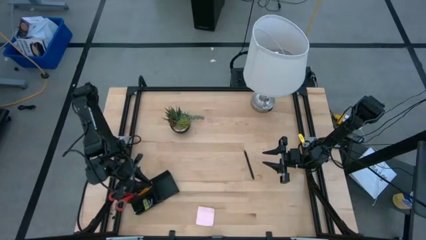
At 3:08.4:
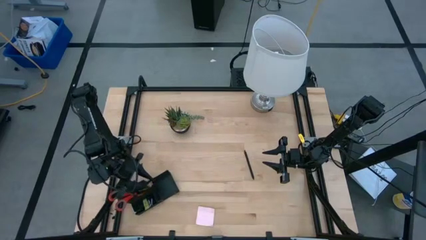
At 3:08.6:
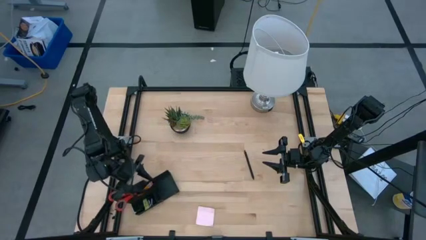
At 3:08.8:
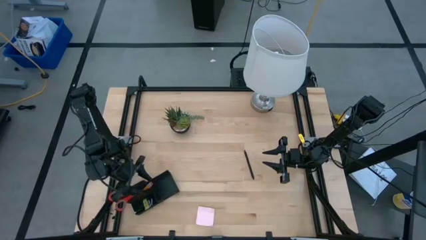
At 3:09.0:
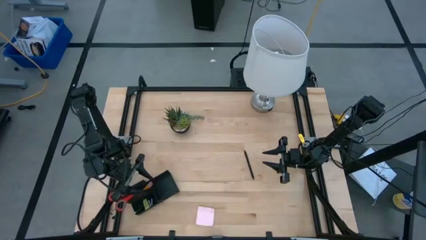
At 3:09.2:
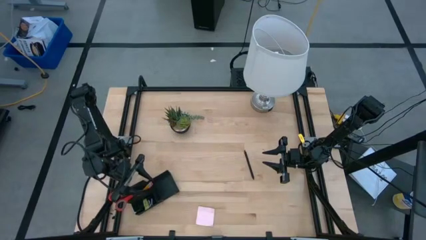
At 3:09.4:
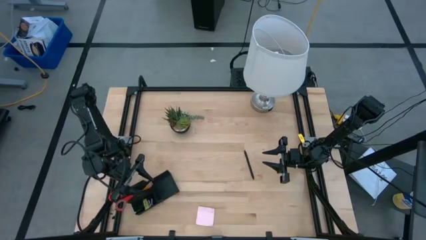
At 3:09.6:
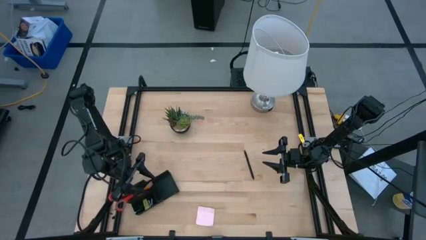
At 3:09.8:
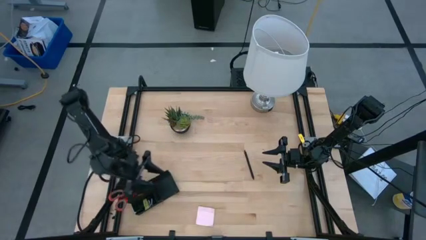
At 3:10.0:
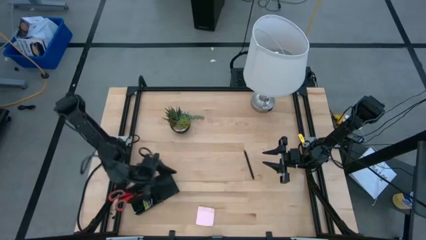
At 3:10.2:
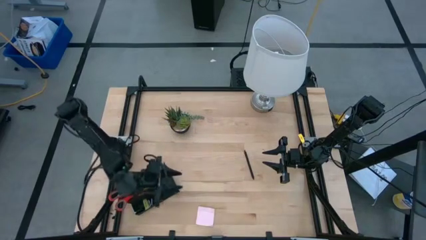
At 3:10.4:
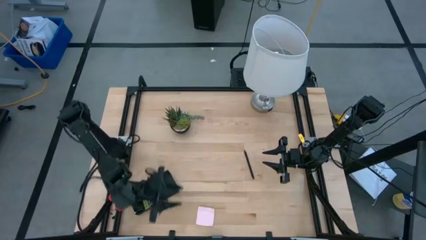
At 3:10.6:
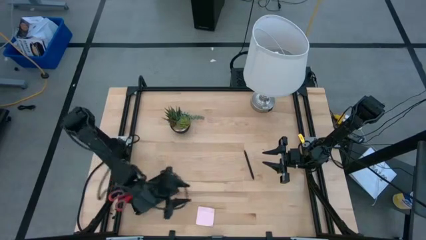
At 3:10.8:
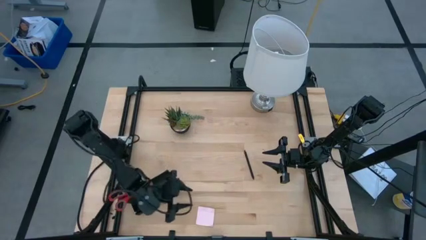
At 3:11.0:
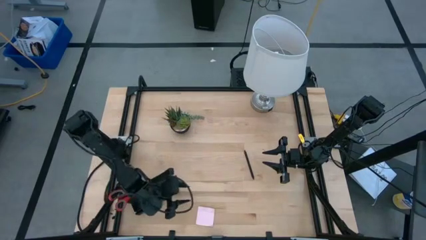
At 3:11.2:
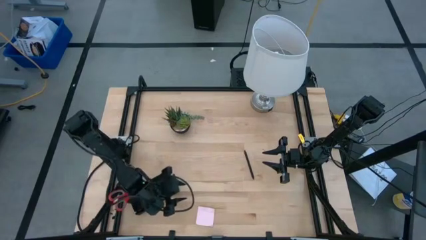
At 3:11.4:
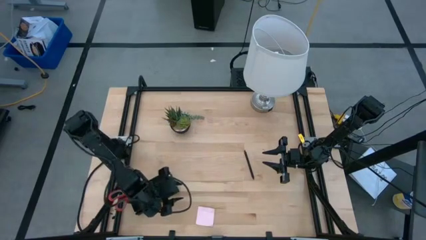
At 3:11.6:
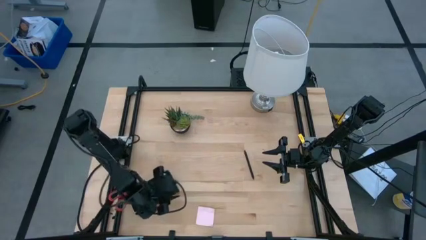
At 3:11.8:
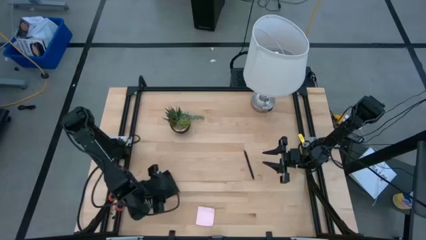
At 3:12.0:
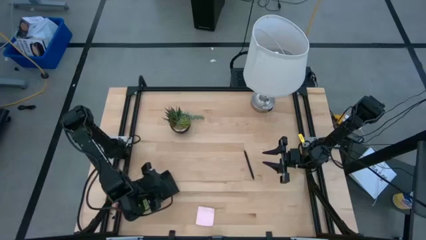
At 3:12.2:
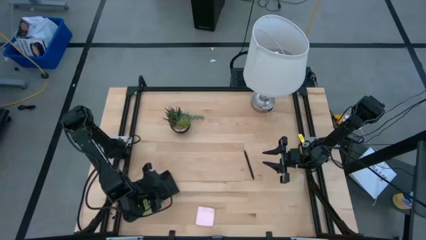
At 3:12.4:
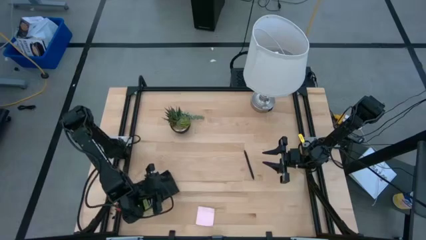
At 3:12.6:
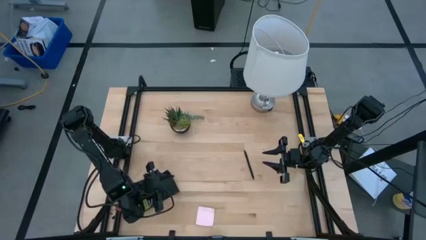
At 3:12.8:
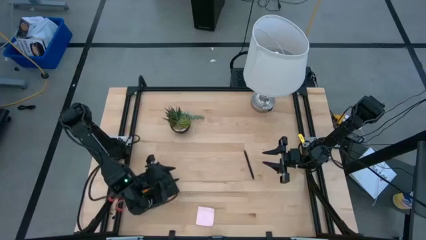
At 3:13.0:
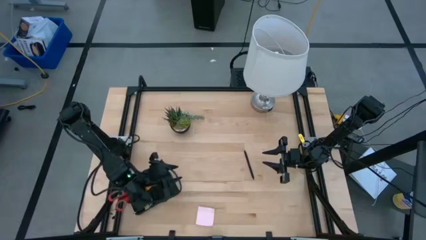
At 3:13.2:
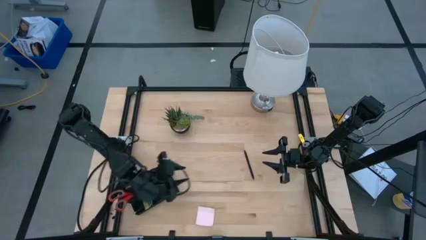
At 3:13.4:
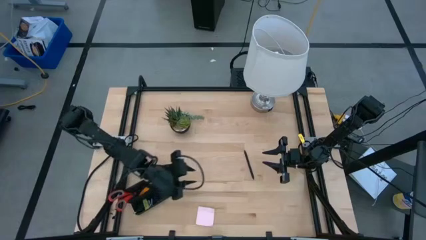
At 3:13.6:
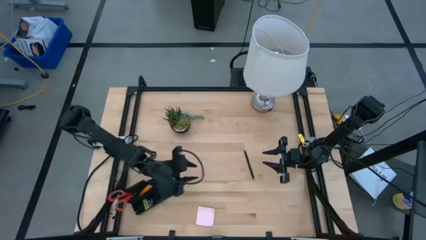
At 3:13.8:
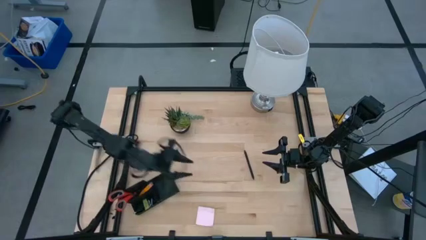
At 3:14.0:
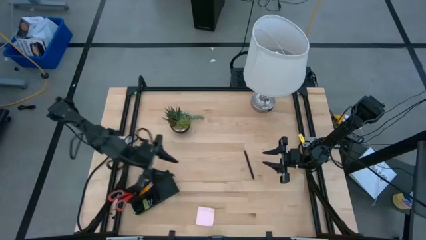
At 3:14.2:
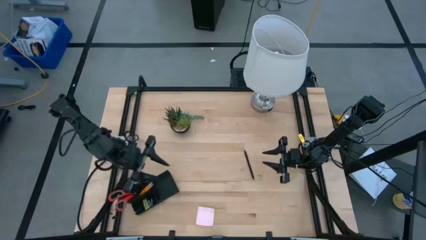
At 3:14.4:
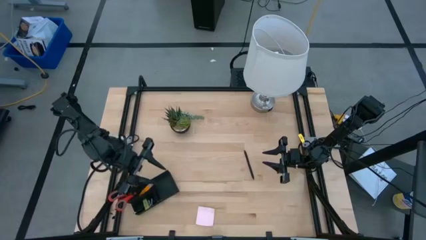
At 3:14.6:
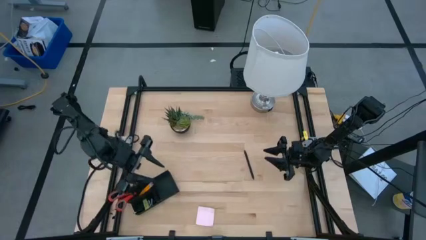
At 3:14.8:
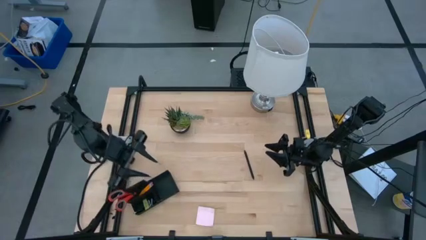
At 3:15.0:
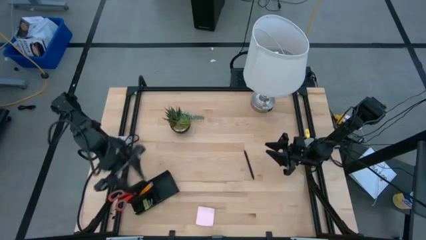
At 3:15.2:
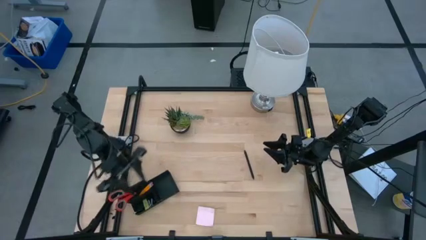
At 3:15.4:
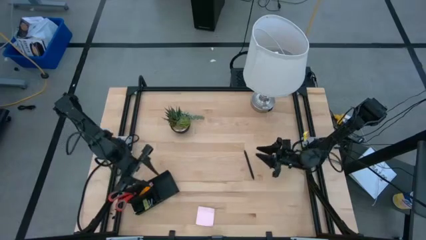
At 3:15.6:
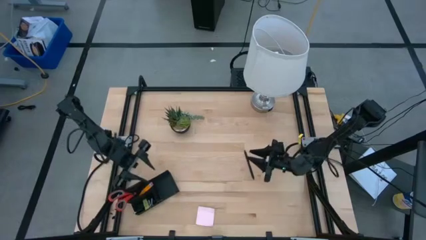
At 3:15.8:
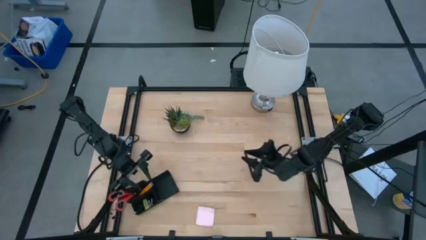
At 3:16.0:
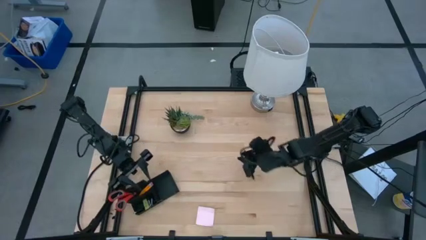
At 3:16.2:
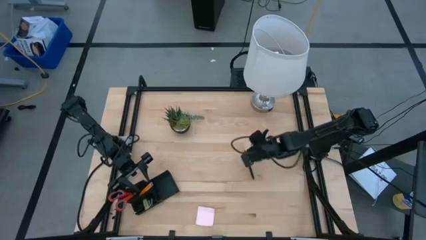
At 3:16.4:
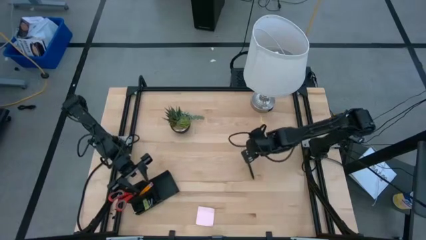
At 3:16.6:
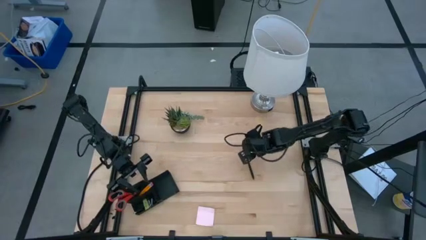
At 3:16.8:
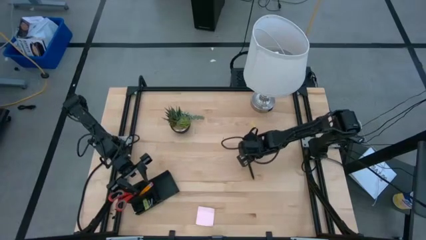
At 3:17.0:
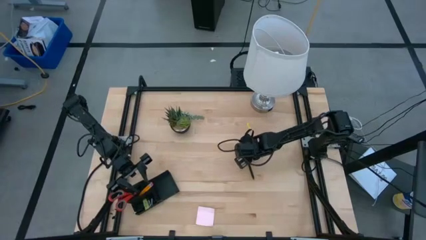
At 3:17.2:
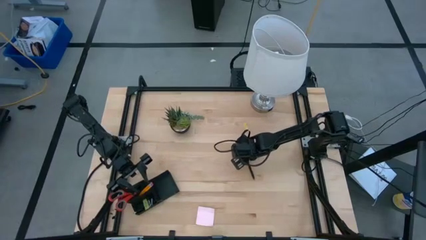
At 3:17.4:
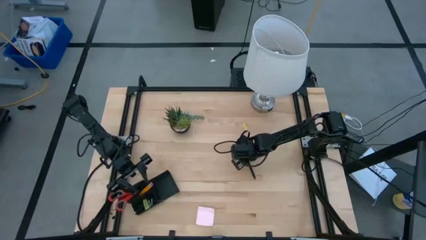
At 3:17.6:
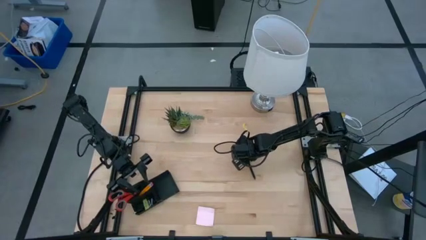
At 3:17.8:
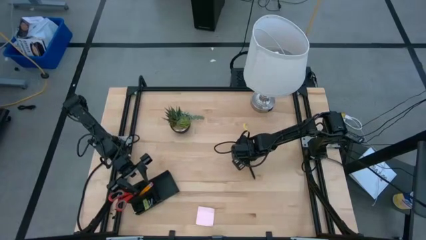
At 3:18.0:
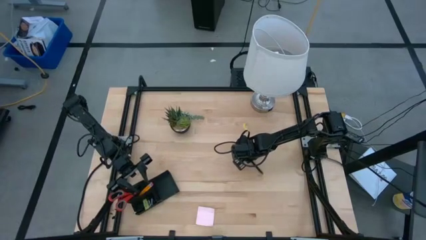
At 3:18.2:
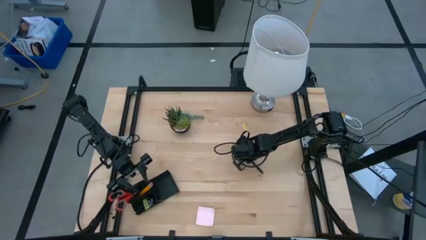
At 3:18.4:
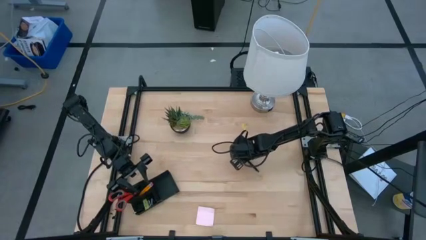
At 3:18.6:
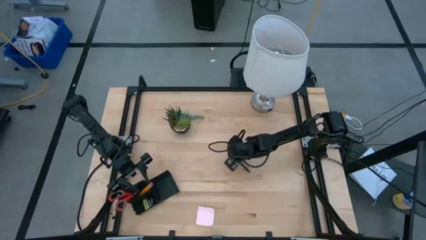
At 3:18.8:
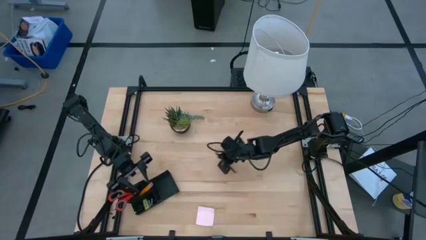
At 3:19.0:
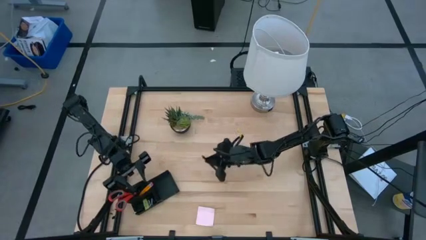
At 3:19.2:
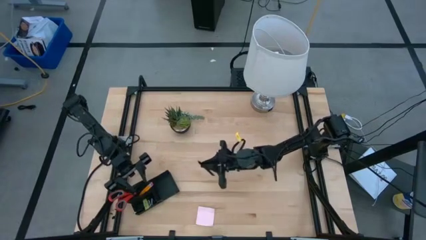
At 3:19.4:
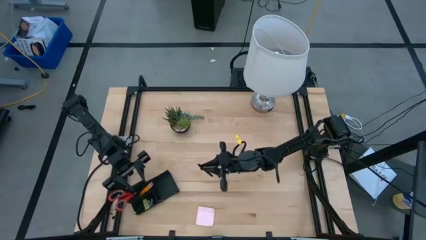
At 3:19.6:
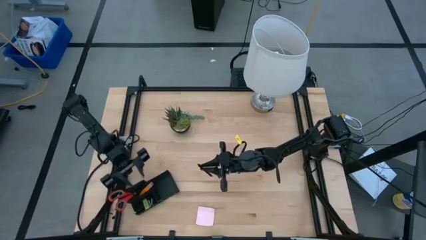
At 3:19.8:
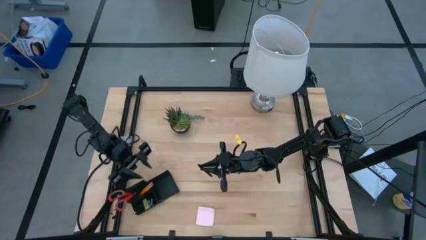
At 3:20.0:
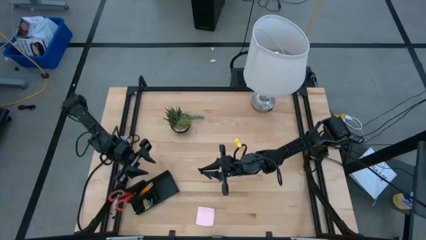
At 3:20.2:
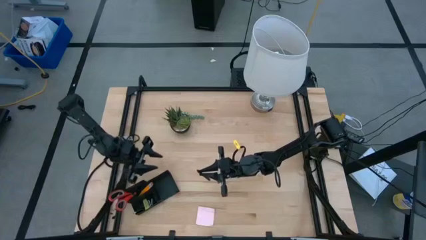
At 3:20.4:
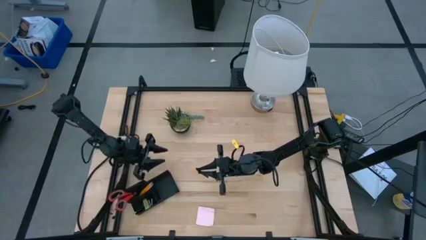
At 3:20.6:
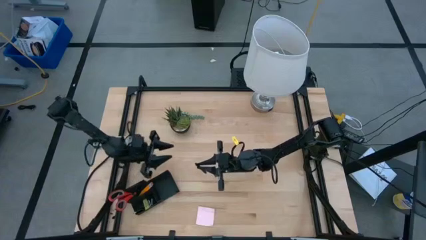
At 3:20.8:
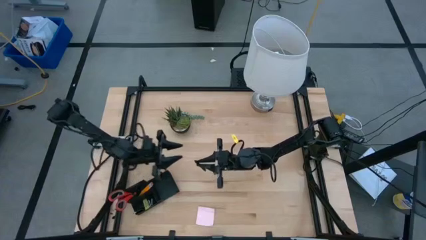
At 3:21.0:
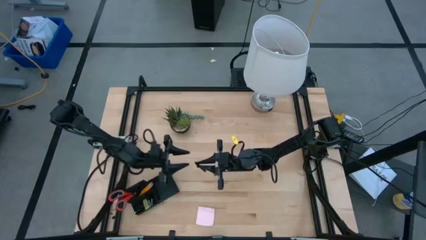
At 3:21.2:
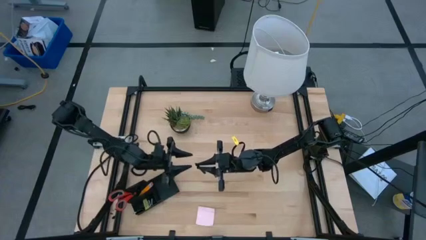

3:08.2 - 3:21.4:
Task: Pick and place office supplies into organizer
Put the pen into the top left section of the desk organizer

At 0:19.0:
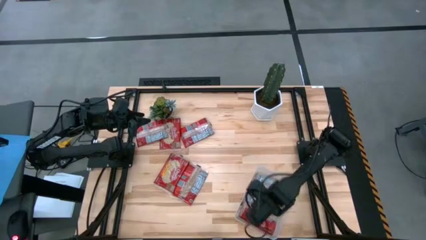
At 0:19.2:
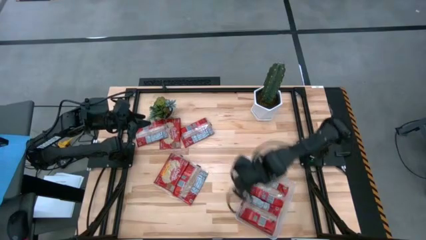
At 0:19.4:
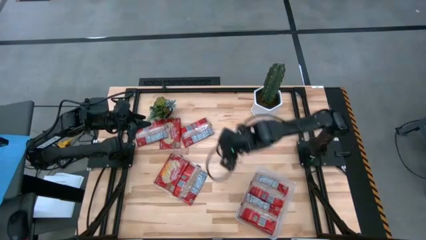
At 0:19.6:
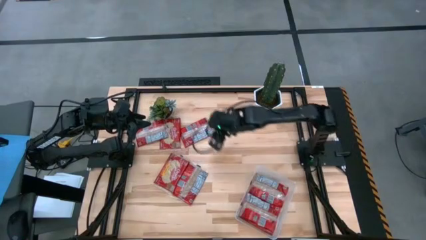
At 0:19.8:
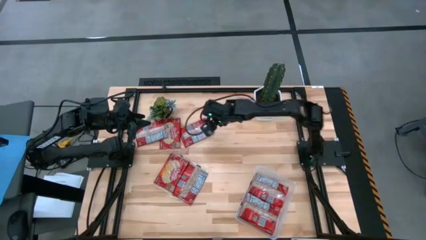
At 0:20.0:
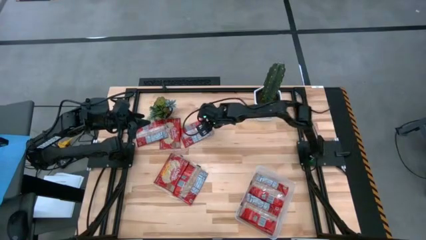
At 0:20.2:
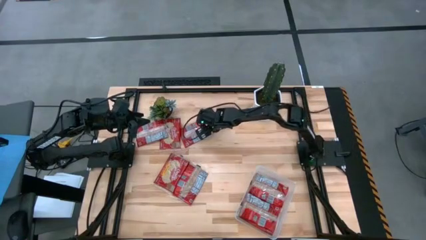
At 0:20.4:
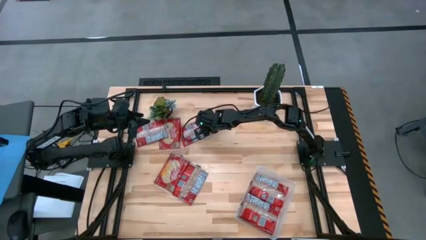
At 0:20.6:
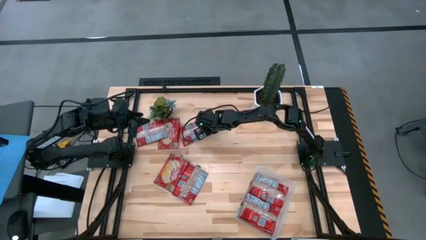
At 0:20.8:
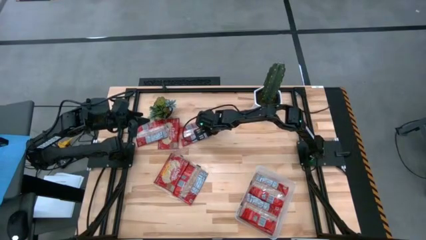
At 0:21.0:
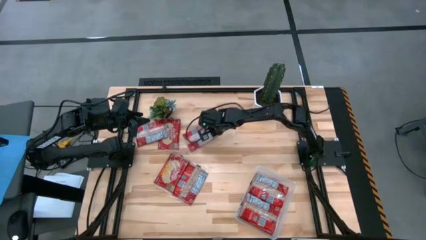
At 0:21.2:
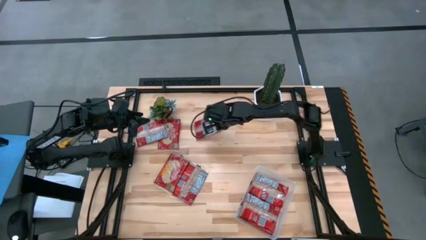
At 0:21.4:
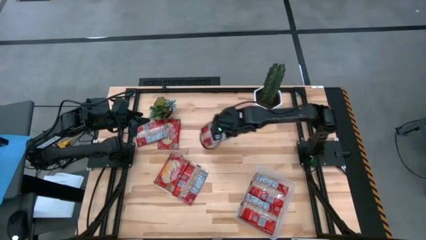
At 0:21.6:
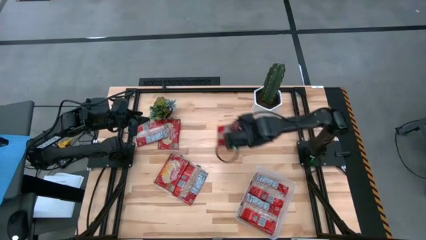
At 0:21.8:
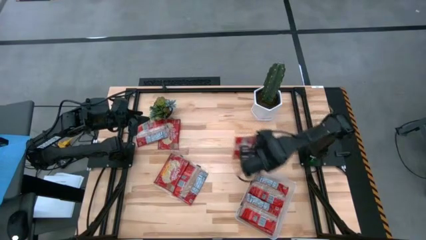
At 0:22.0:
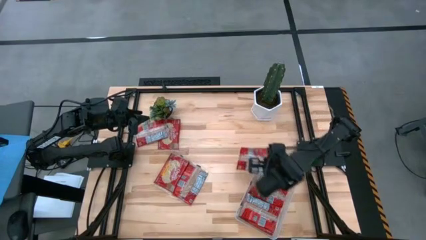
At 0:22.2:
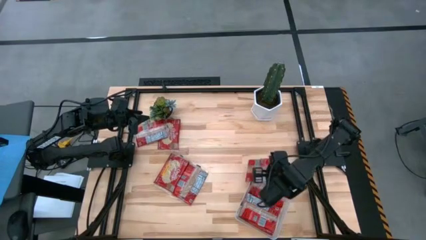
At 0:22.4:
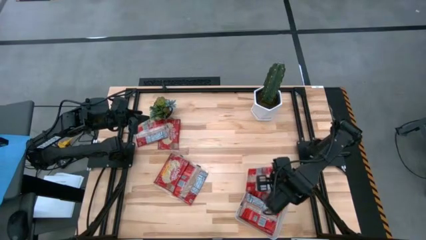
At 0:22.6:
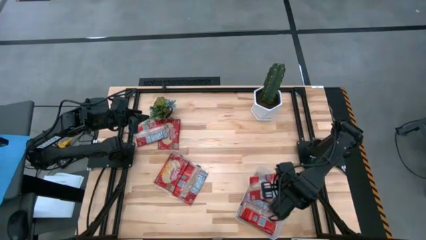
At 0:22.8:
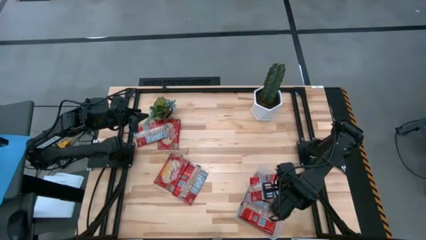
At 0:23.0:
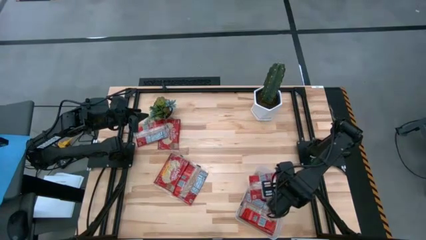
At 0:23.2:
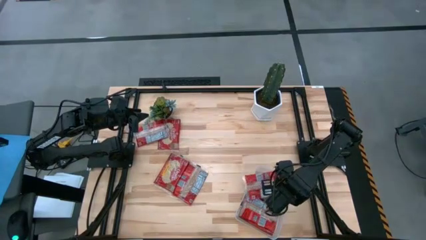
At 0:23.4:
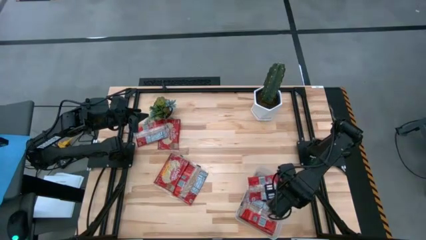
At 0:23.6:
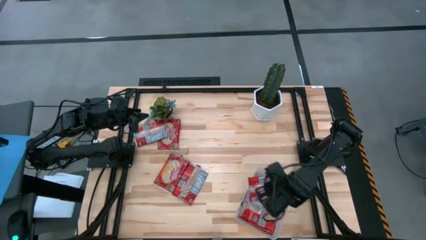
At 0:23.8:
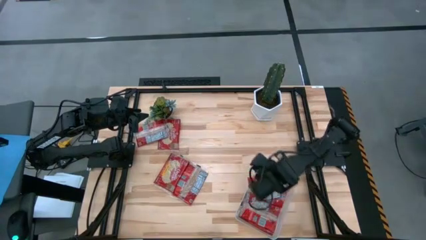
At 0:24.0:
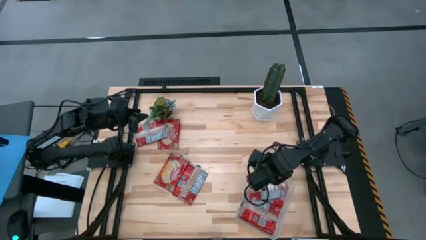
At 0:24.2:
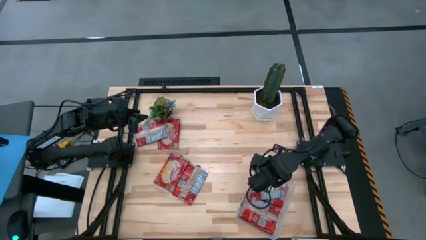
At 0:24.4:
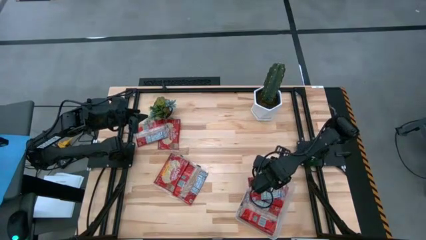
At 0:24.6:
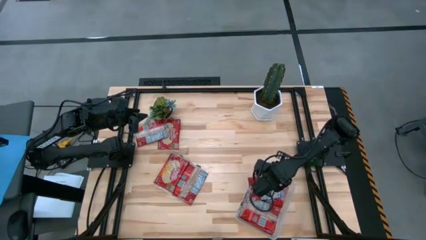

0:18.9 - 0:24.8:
Task: Sort popcorn bags into baskets
Put the red popcorn bag into the transparent bin
